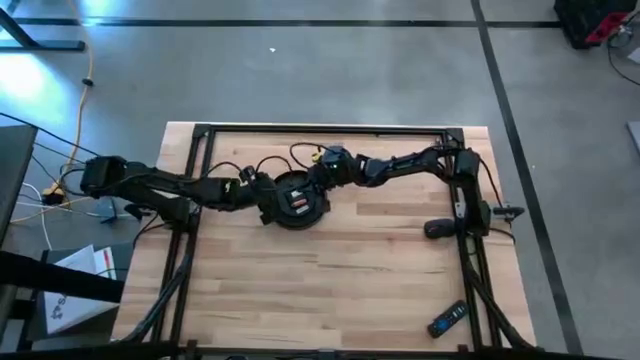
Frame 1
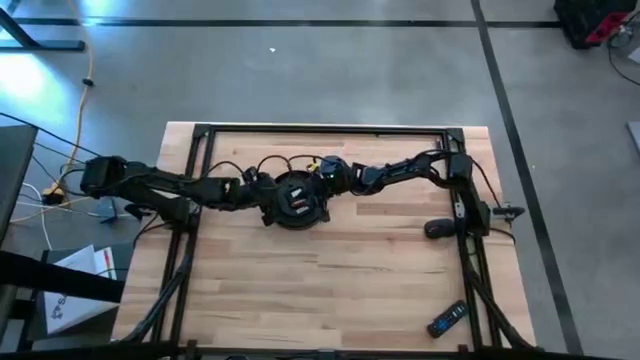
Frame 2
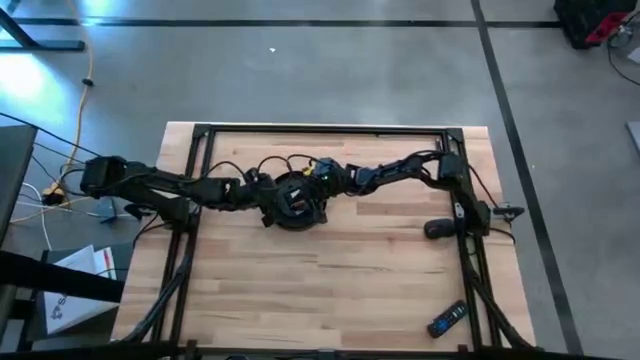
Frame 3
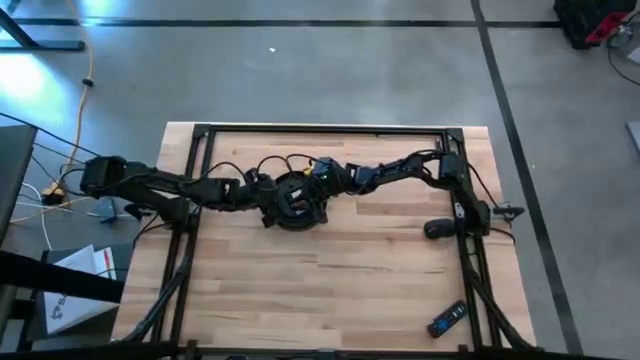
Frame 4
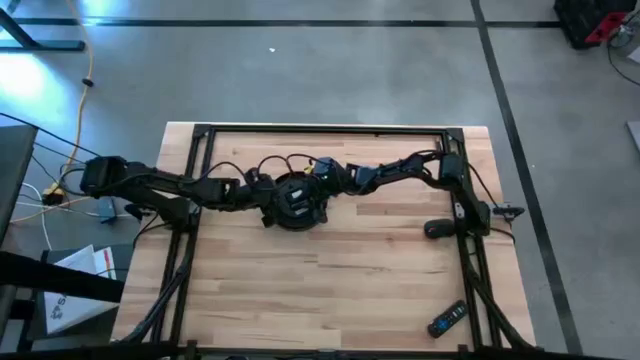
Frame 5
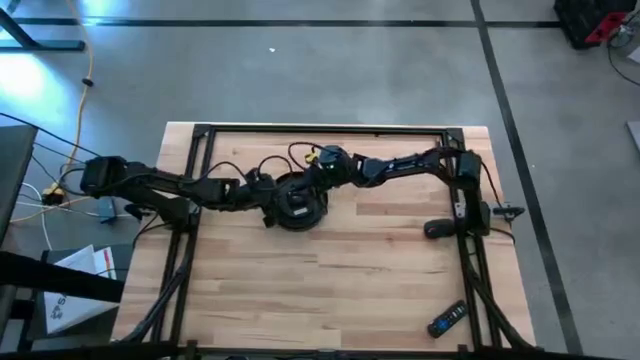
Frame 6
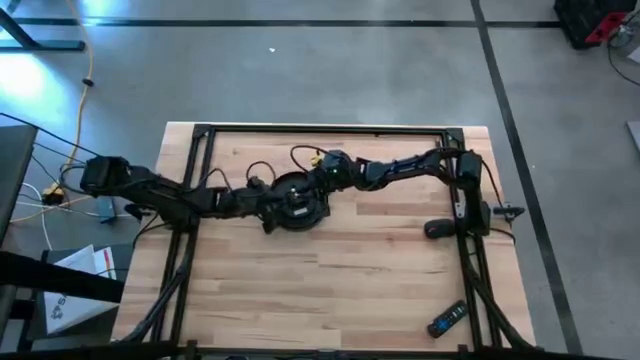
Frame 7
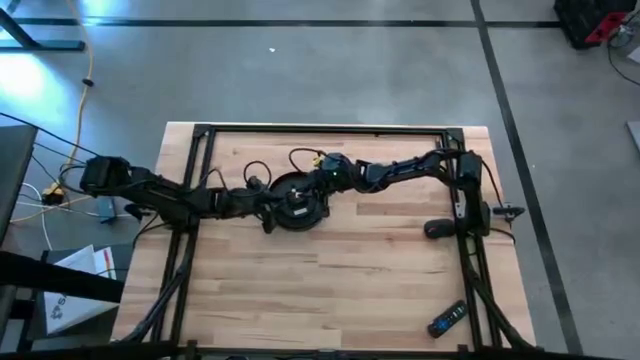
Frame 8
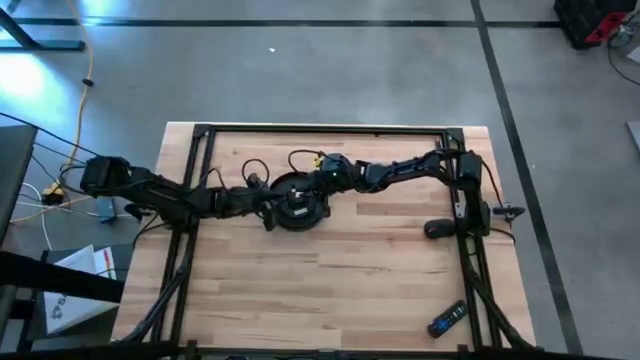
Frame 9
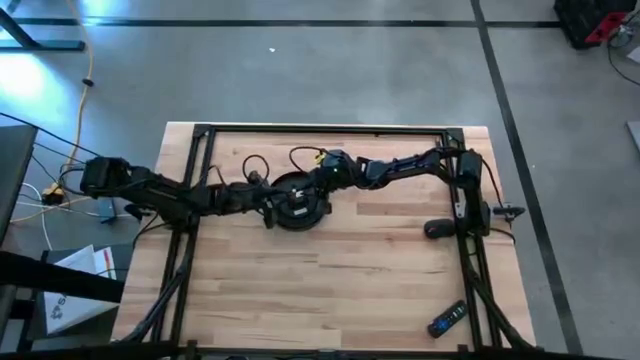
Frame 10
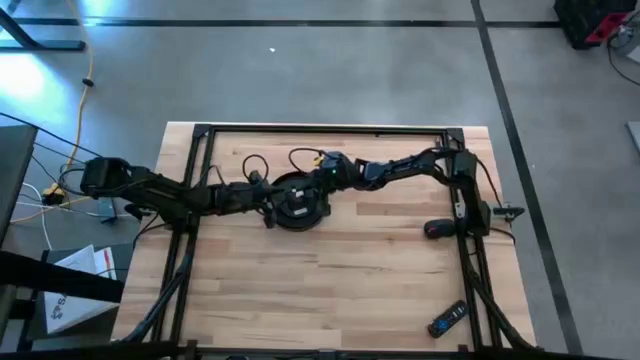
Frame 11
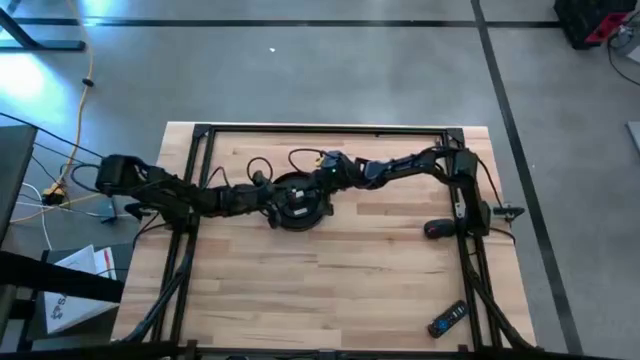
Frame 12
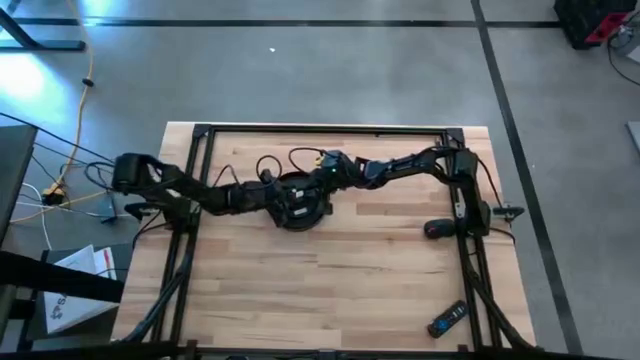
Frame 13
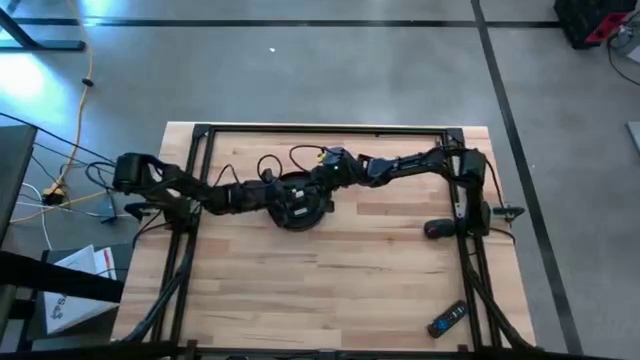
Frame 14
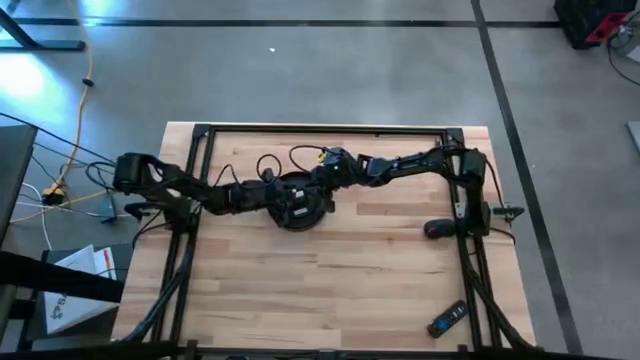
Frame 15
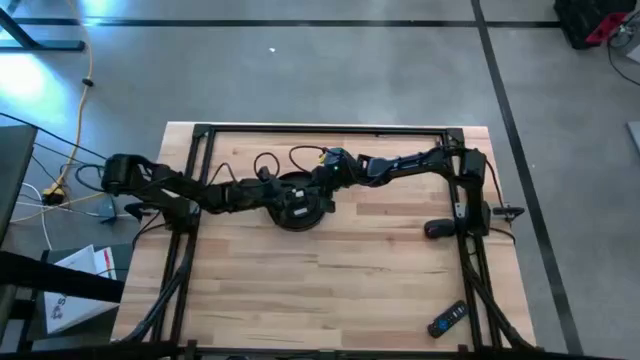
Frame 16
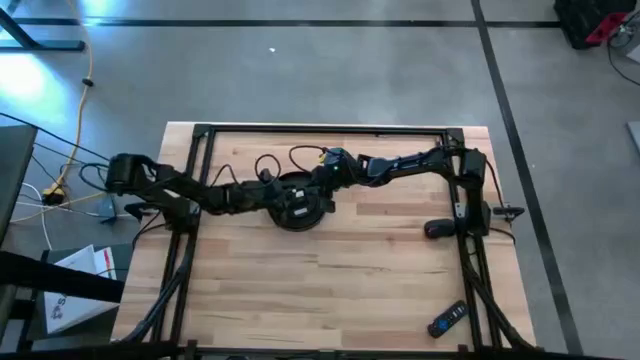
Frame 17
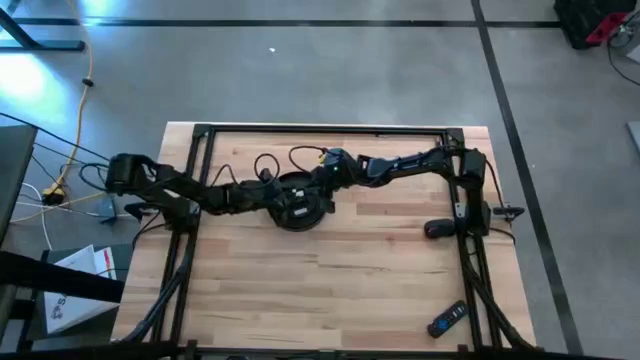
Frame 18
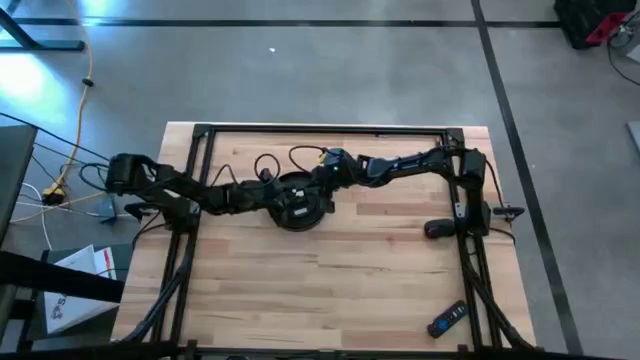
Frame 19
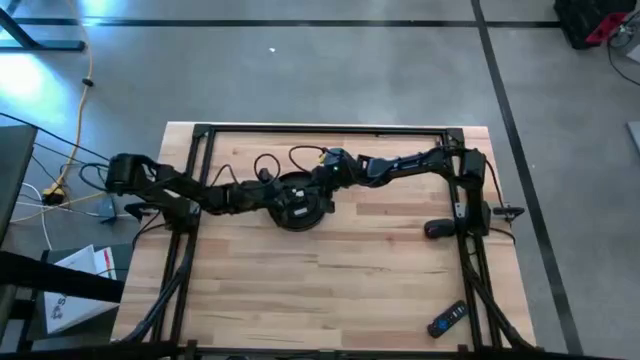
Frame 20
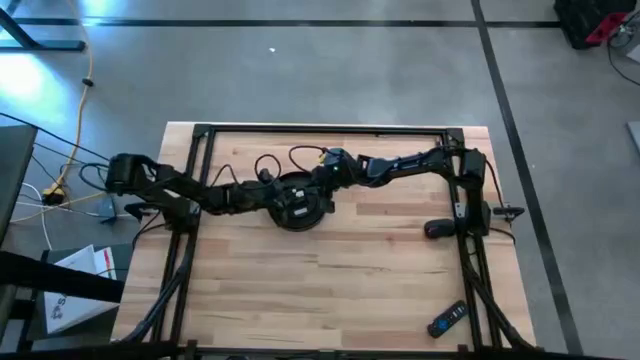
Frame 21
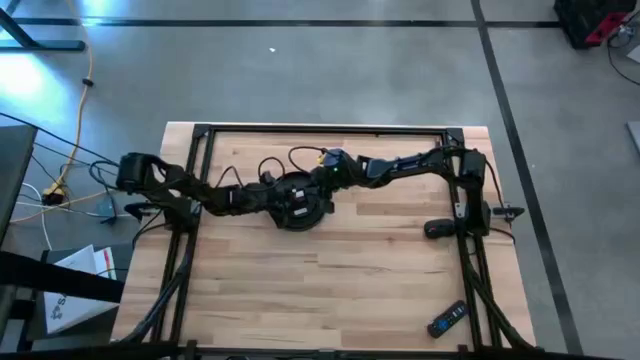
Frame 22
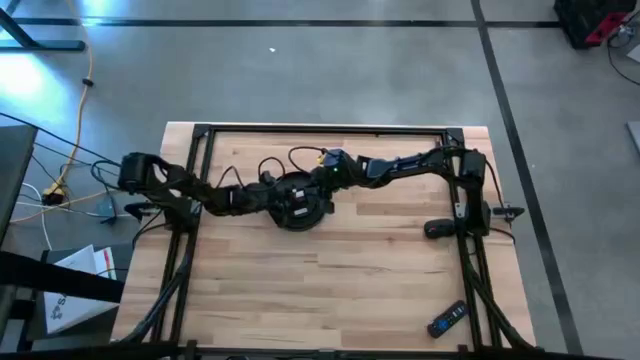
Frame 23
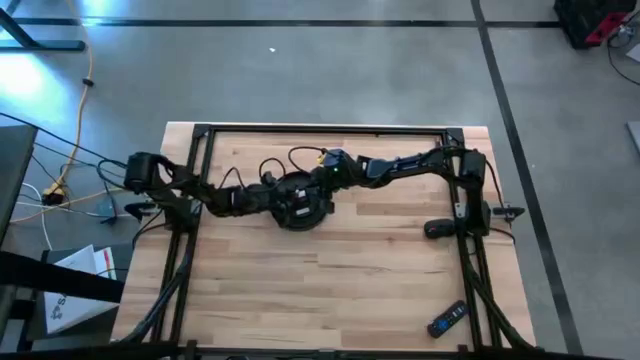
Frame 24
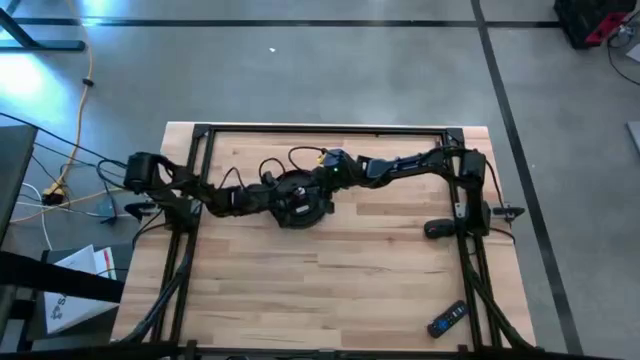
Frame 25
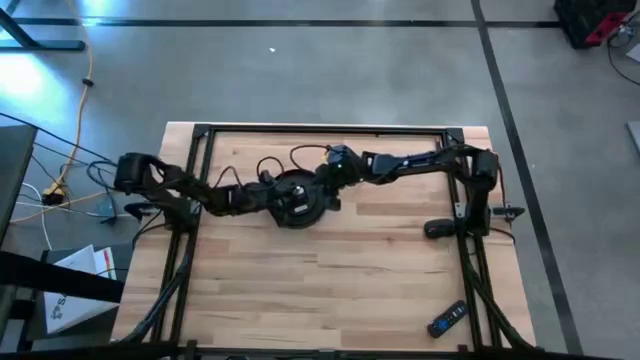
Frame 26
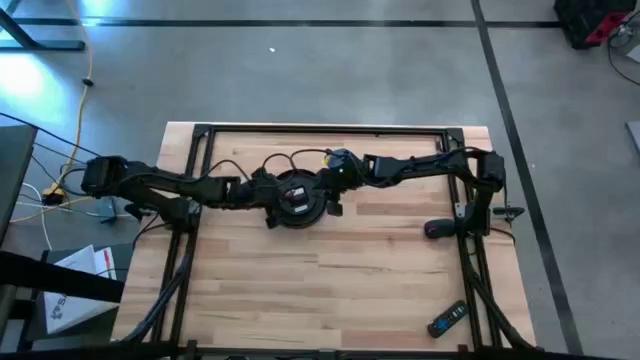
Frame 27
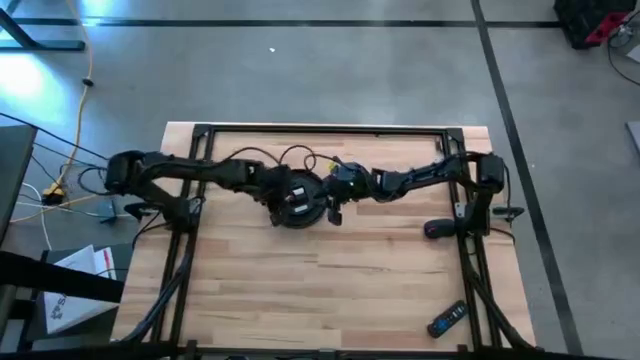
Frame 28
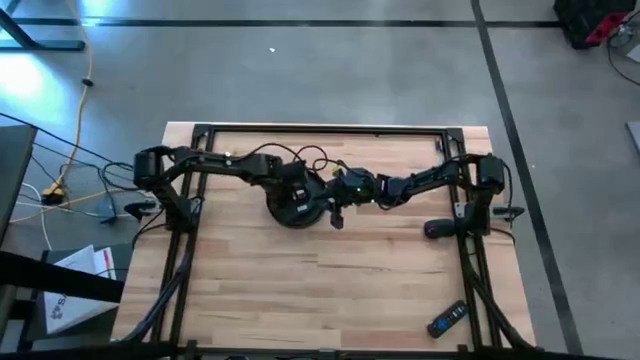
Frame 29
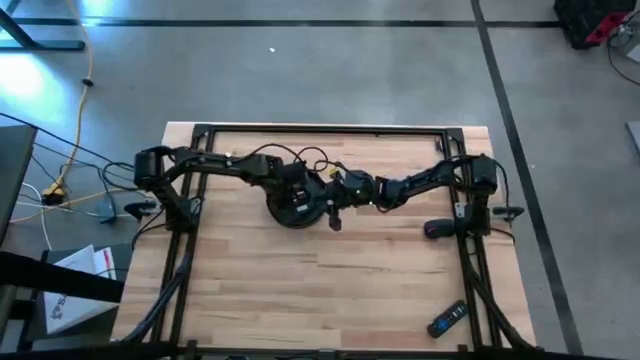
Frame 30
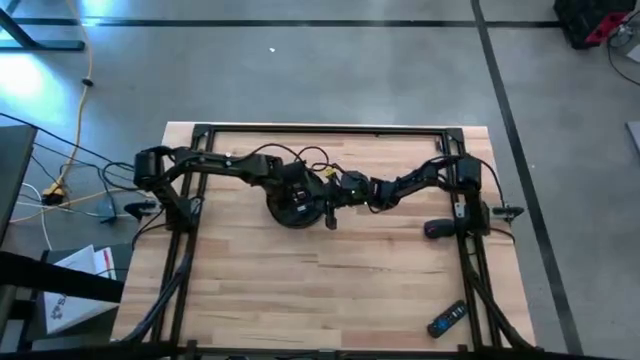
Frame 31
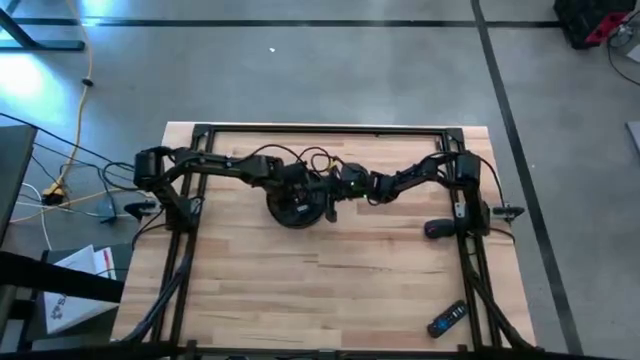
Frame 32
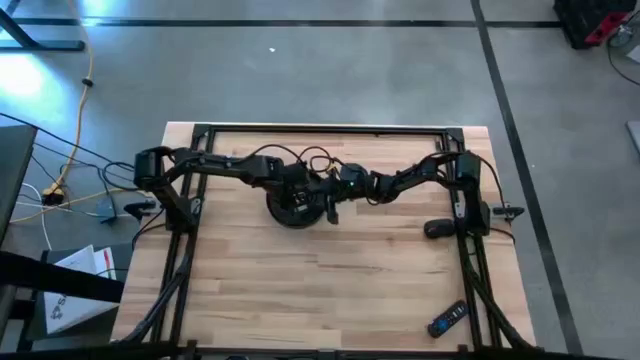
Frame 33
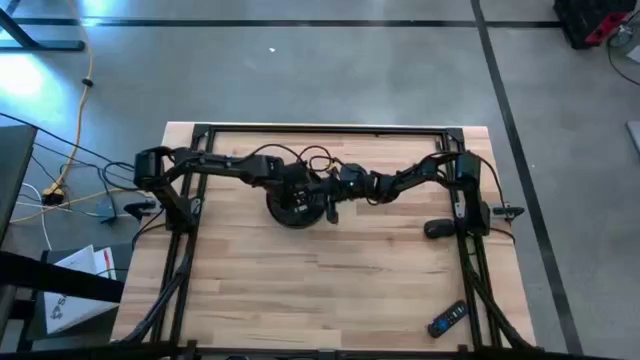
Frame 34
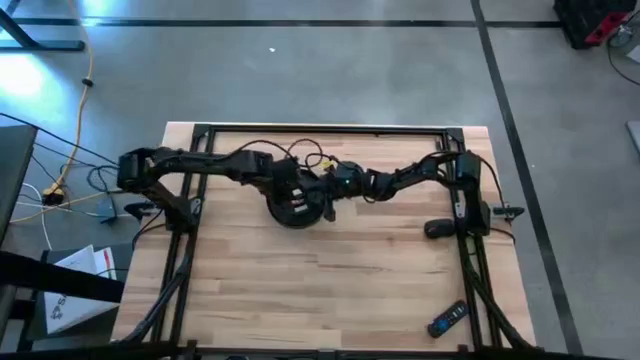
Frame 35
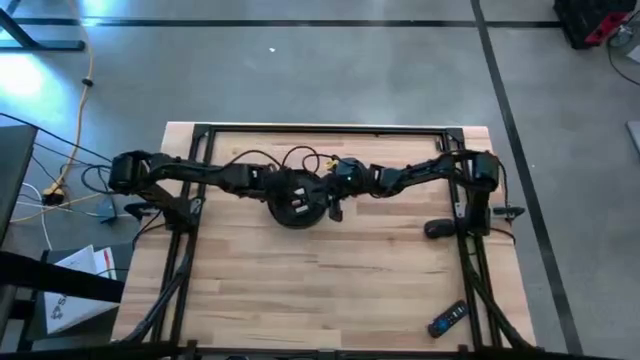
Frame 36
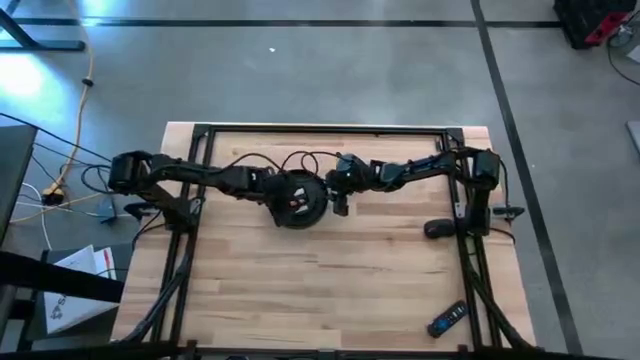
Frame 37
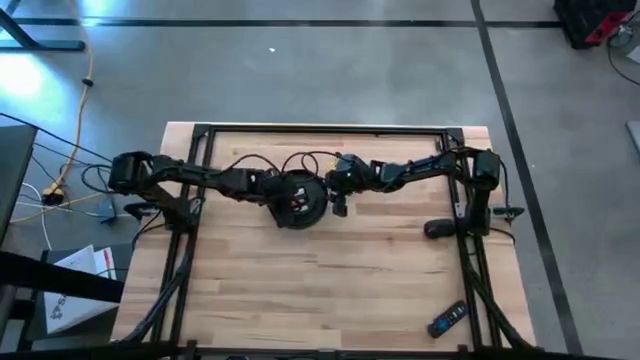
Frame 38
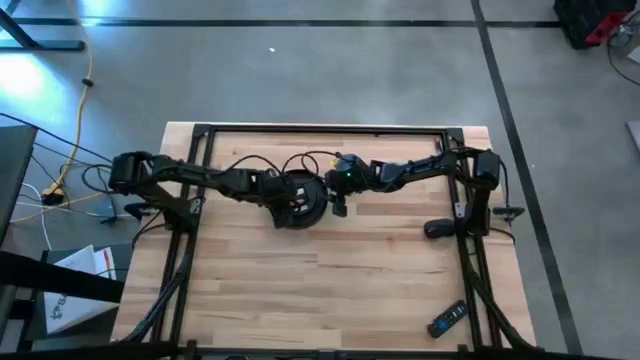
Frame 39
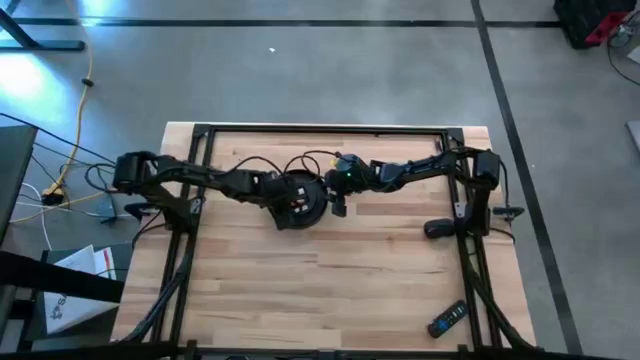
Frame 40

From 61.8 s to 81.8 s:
Task: Insert battery
Insert the yellow battery into the white-black wall clock

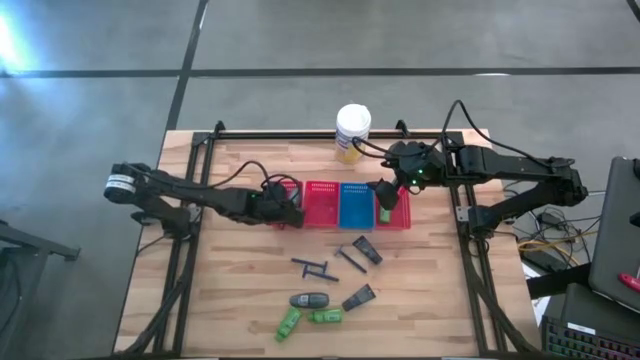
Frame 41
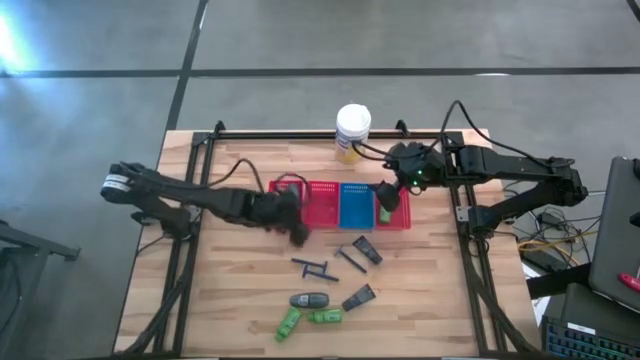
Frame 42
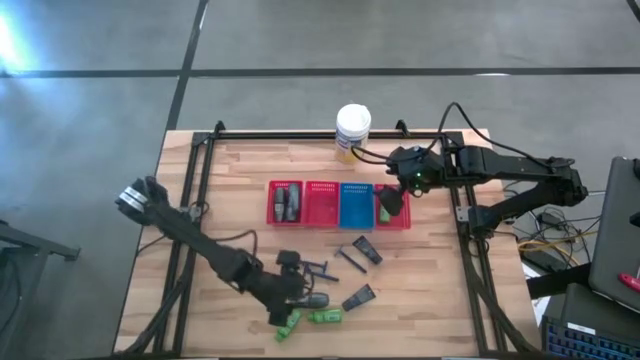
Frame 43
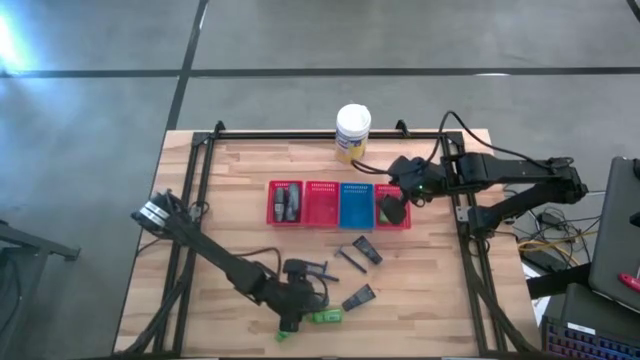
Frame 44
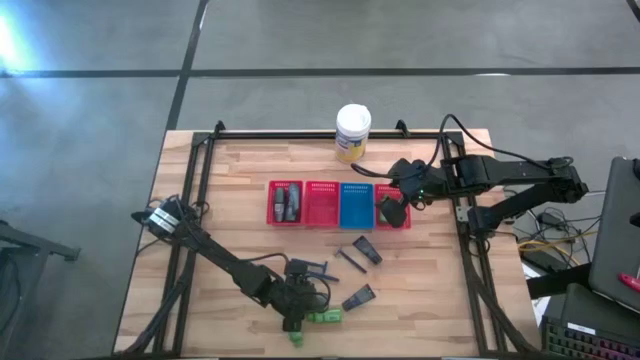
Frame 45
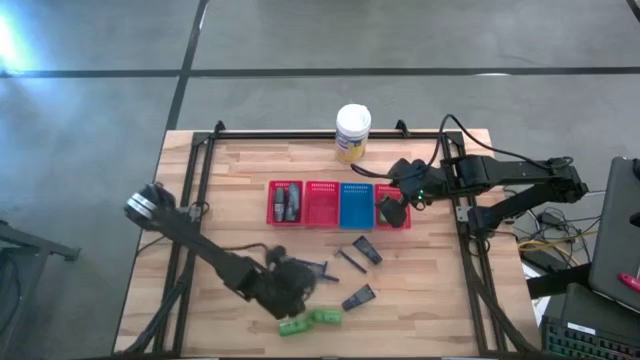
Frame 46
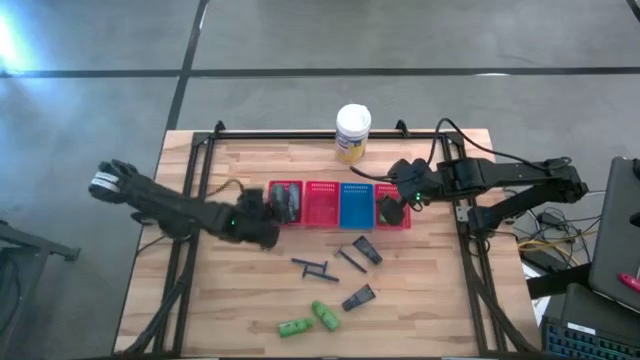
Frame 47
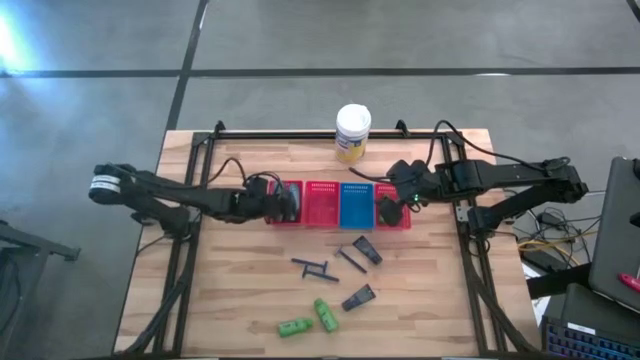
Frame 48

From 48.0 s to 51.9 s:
Task: Pick & Place Travel size toiletries
Put the black deodorant into the left red bin
